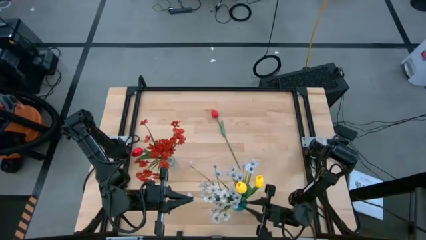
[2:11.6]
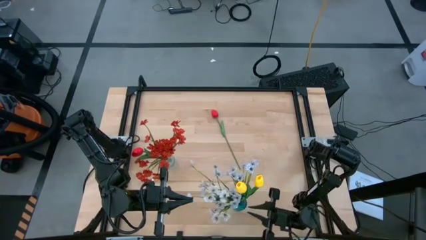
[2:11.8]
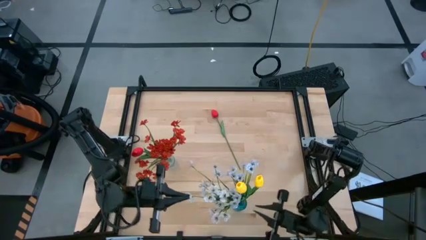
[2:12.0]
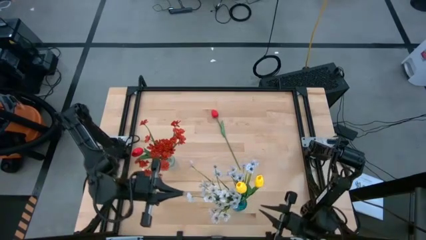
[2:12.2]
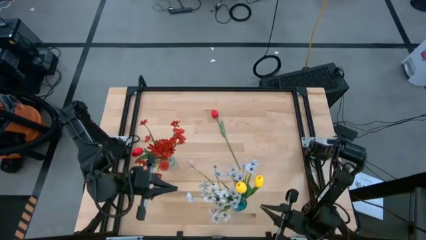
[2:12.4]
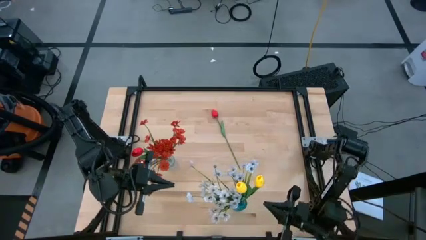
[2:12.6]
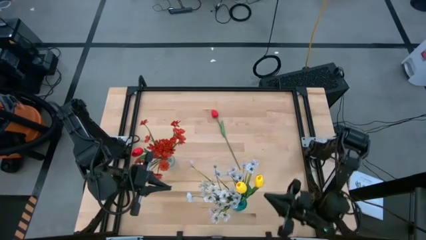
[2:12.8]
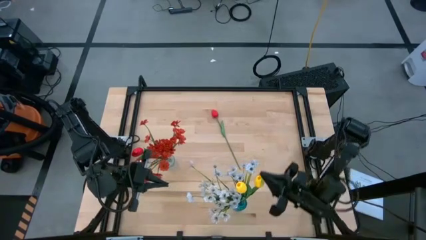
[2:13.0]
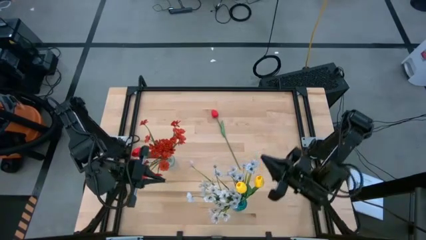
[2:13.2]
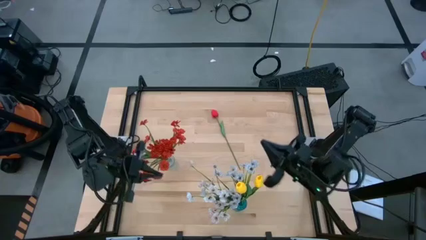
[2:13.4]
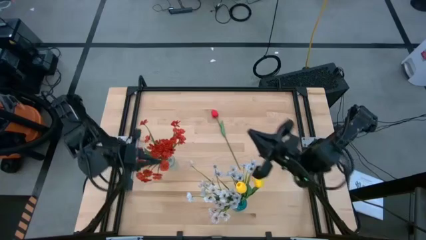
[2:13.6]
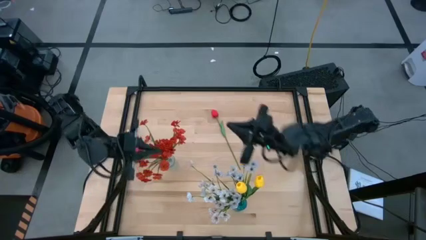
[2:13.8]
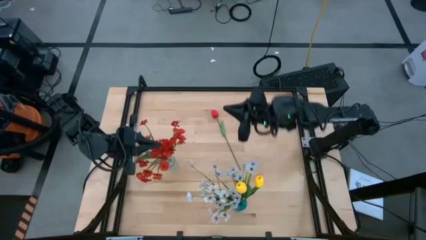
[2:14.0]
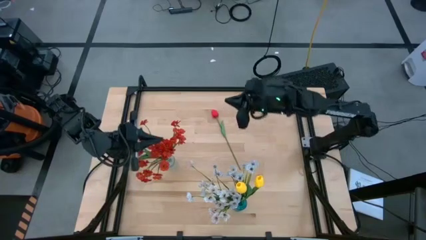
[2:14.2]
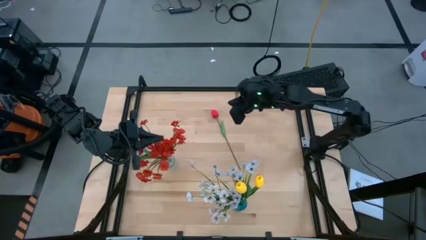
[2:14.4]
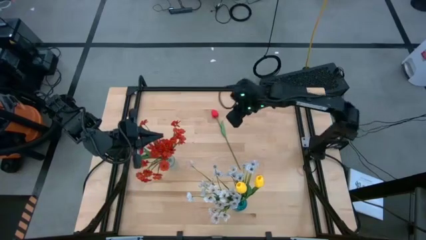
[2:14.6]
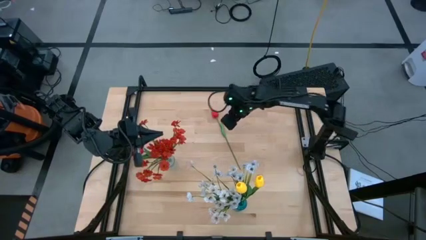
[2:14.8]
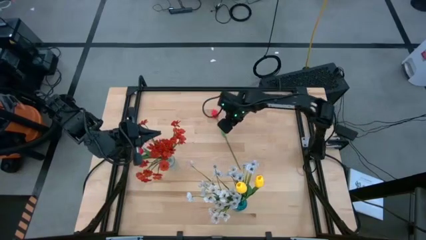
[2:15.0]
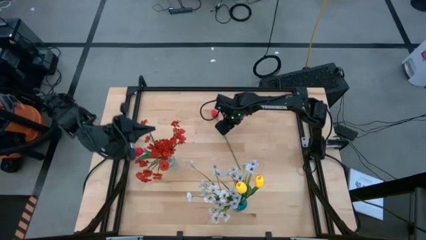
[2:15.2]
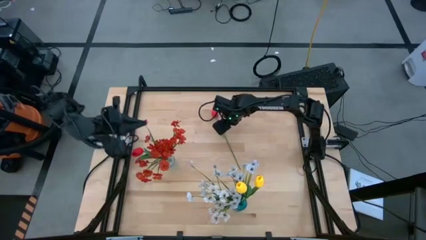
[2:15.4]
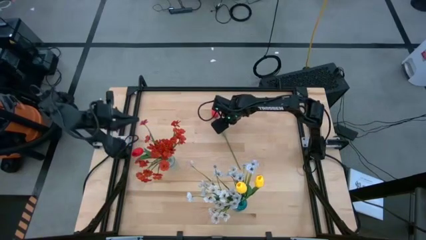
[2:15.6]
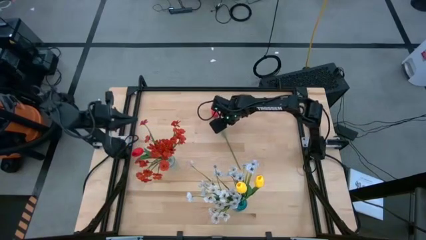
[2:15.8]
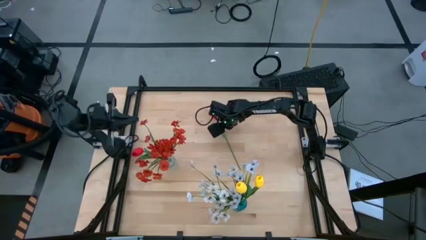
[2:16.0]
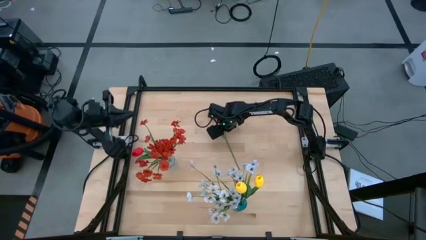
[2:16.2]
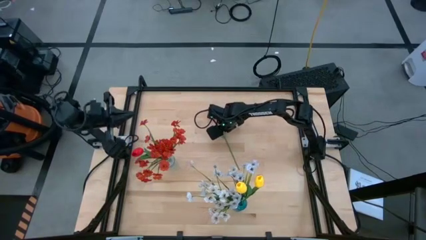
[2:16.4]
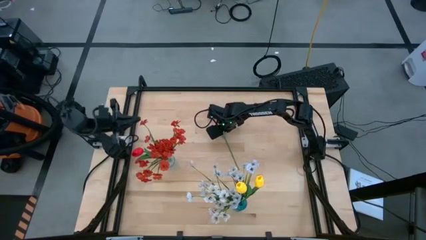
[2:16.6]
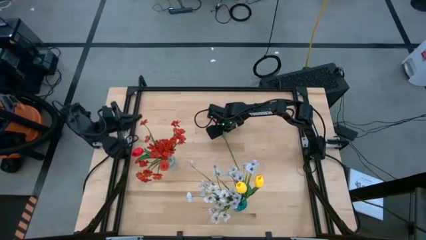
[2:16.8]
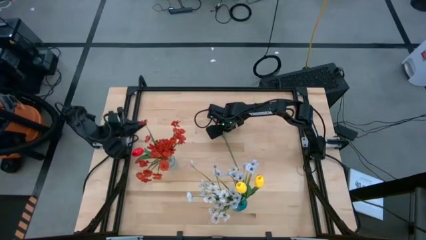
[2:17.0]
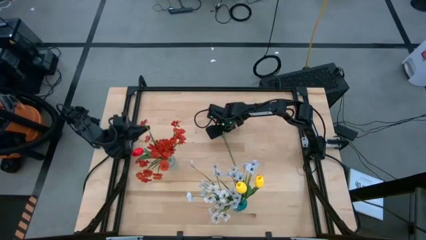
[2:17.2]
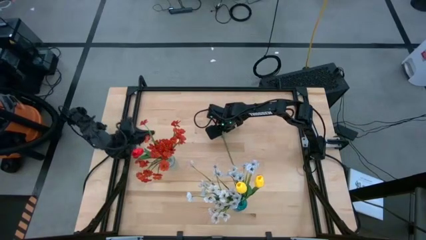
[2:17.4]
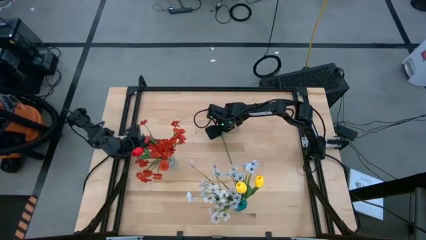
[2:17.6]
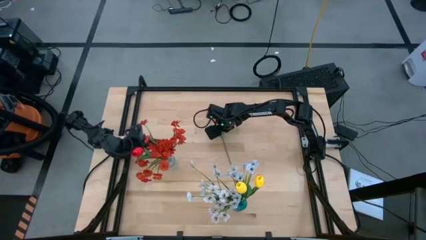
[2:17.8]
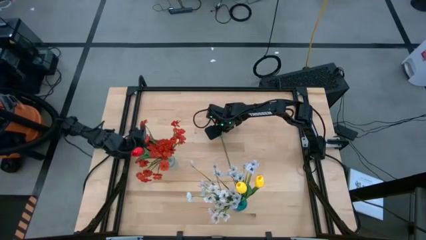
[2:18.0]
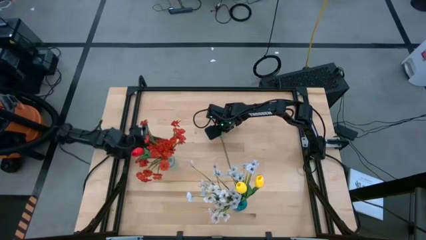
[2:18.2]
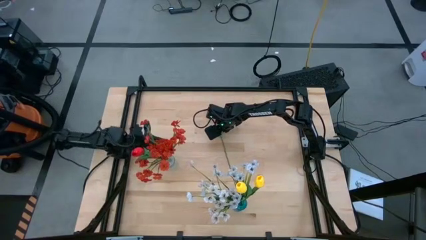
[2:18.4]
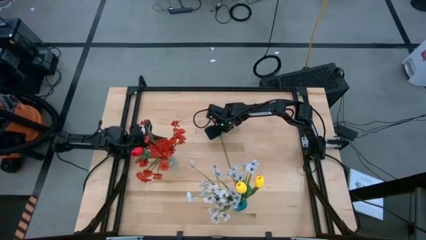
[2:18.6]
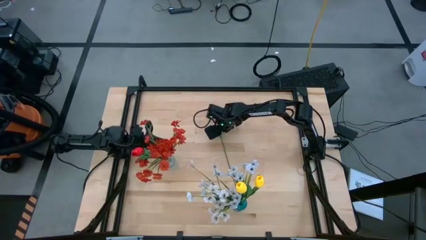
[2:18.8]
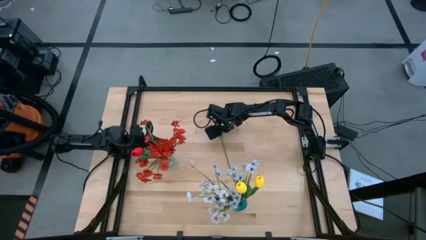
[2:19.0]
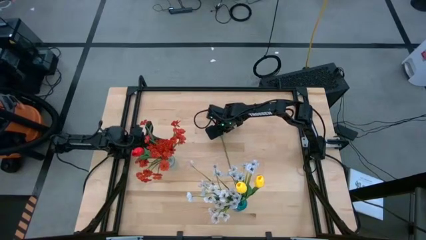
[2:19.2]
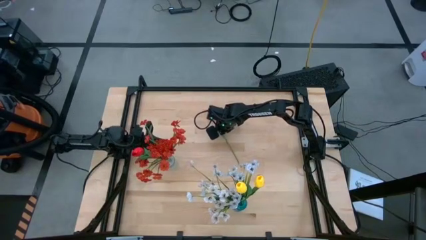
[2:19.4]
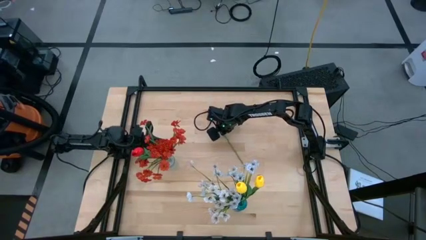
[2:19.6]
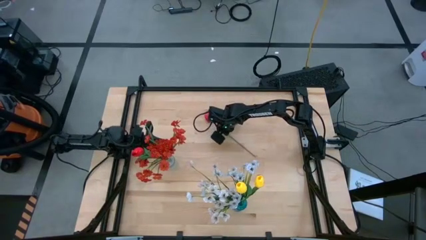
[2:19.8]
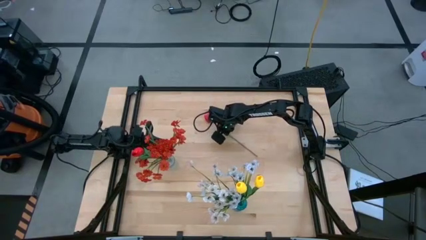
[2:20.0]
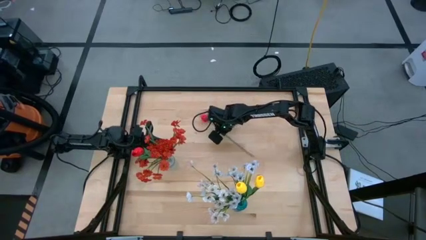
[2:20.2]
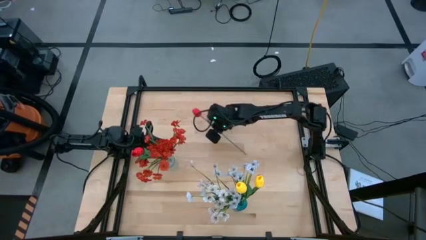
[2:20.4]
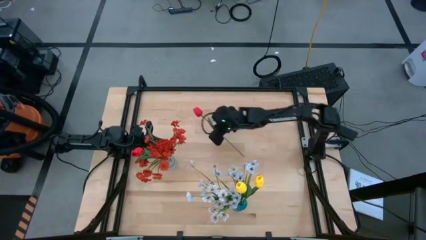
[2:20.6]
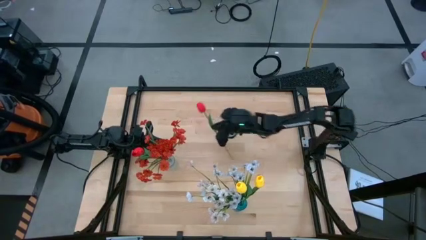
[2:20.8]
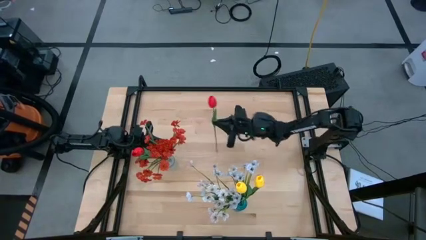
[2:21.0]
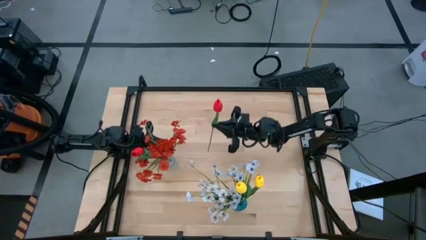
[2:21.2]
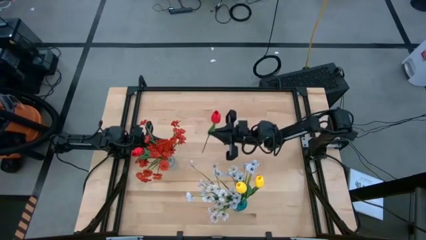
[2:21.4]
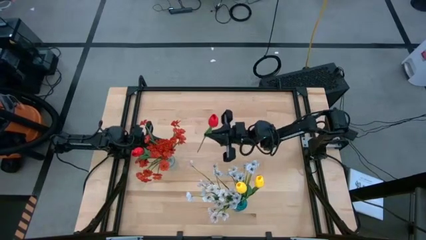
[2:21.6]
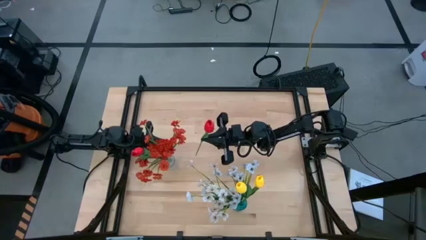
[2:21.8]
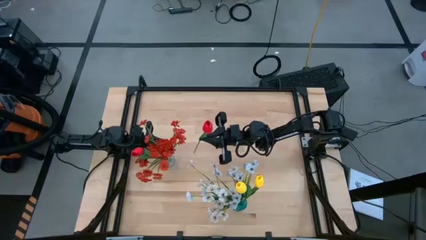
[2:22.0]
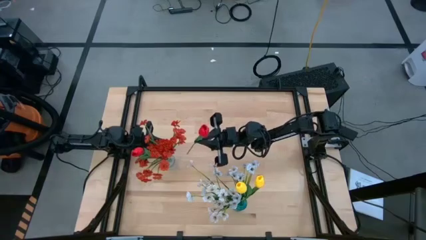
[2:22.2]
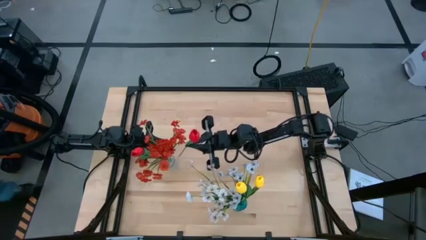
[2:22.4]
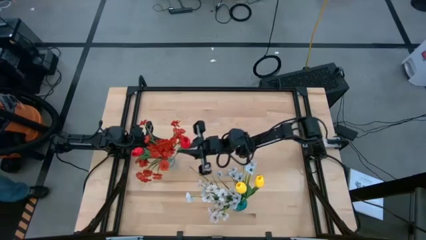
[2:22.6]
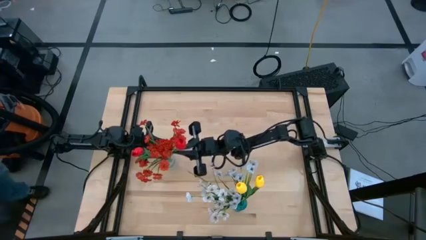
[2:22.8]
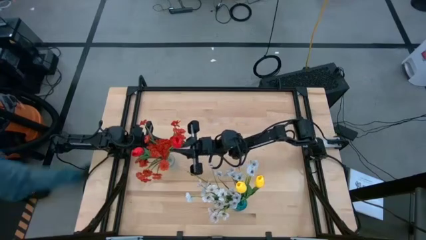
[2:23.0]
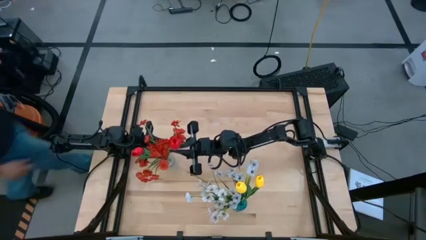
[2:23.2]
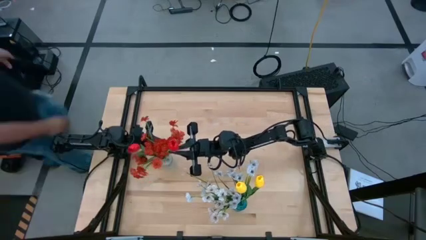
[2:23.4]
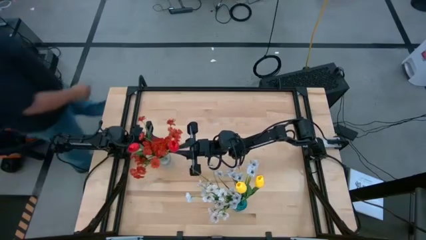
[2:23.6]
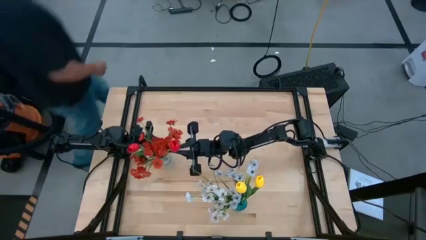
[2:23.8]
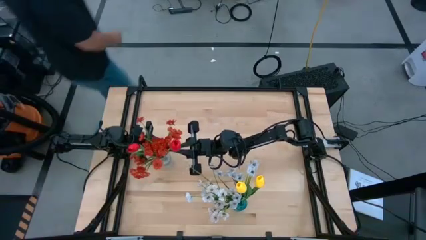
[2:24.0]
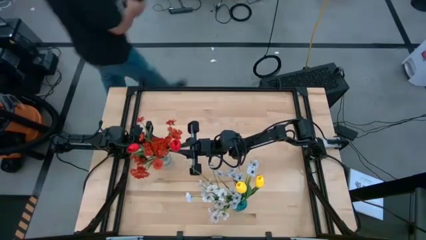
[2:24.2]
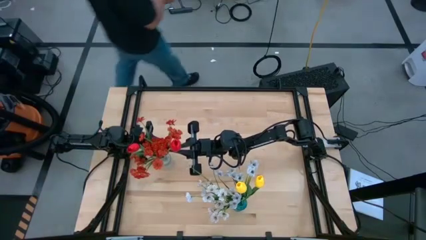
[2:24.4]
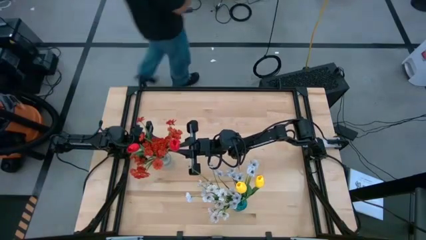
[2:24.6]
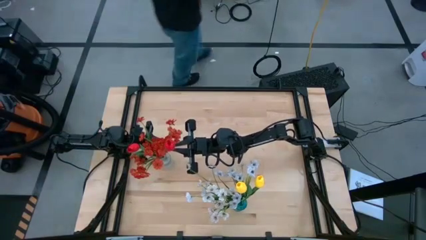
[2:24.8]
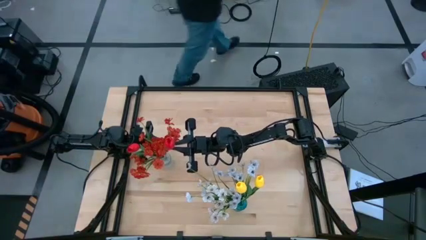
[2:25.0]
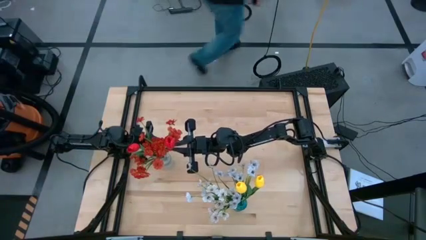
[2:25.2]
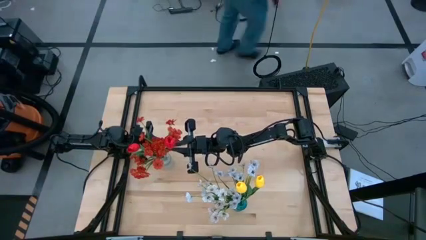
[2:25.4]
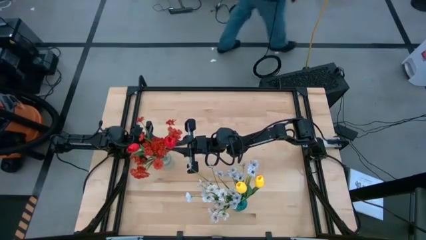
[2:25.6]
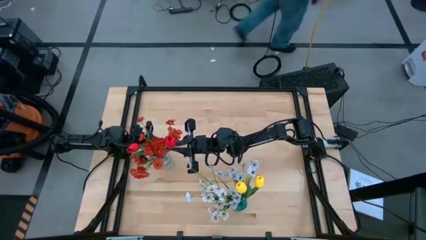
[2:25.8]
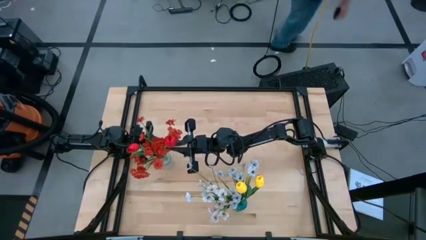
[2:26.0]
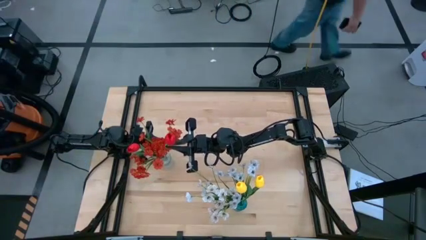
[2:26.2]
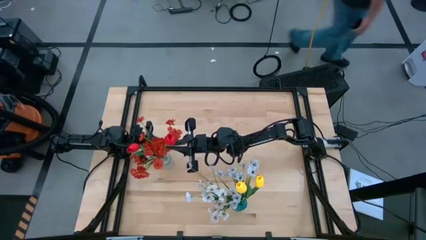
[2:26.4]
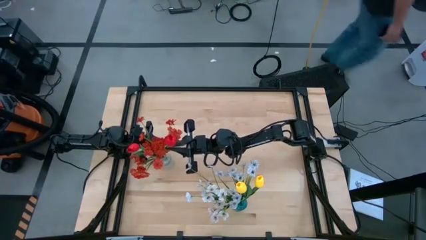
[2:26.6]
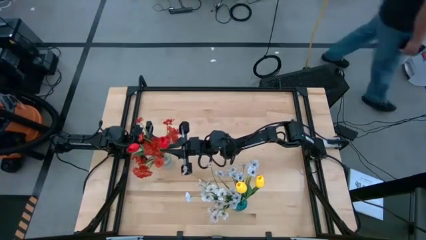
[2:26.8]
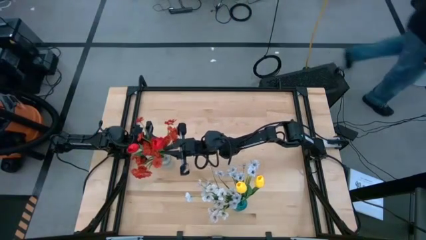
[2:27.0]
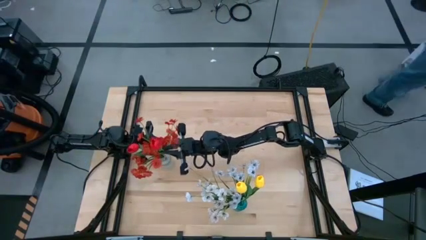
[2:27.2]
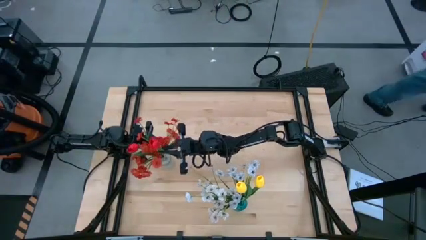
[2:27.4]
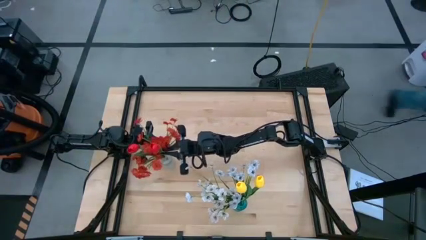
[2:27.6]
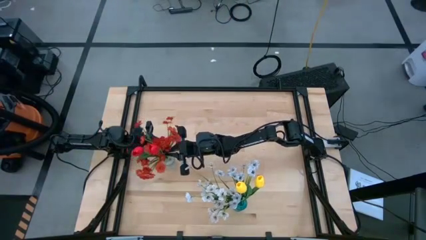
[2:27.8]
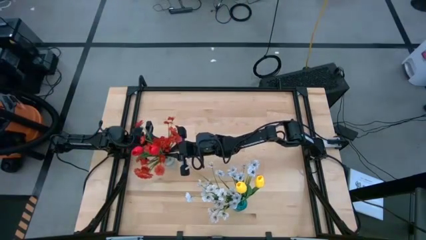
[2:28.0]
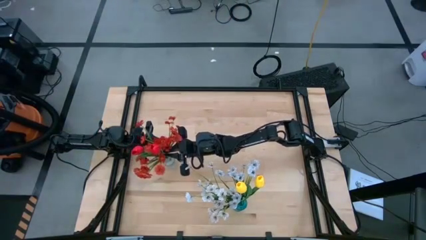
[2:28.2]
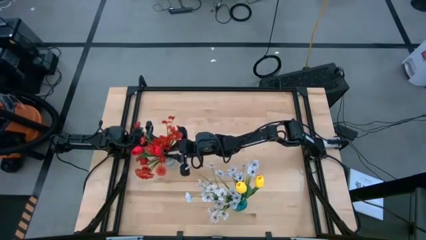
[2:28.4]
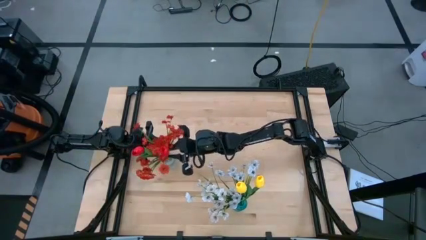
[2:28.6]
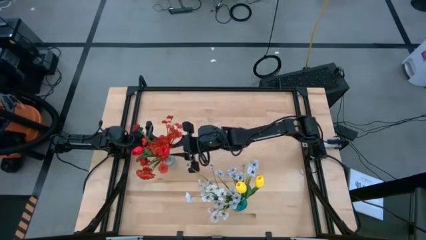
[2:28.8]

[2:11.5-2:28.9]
Task: Sort flowers into vase by color
Put the red tulip into the transparent vase
